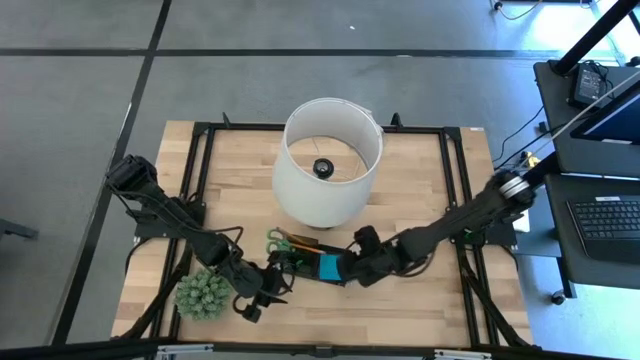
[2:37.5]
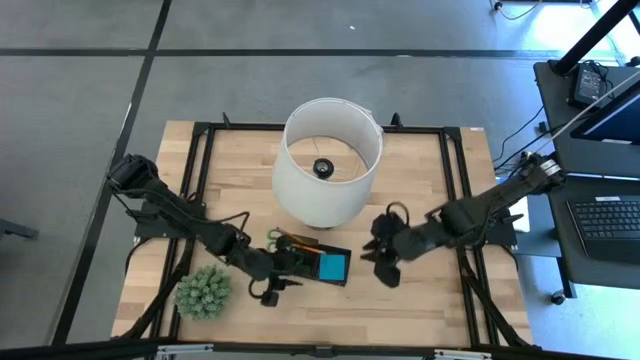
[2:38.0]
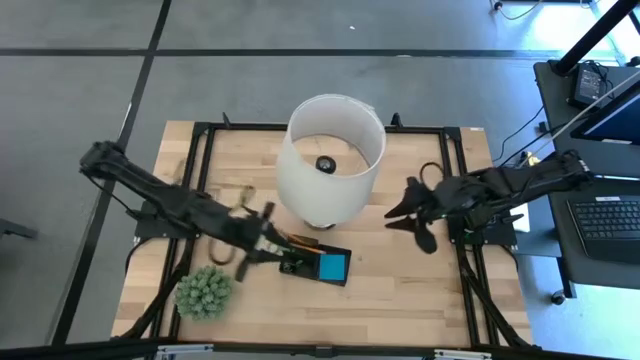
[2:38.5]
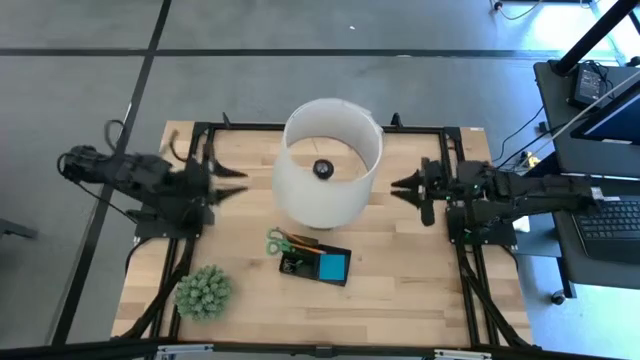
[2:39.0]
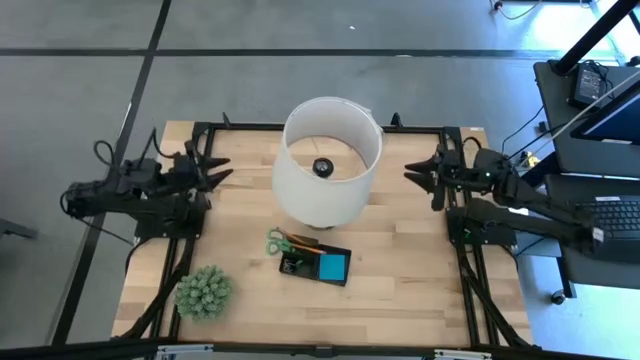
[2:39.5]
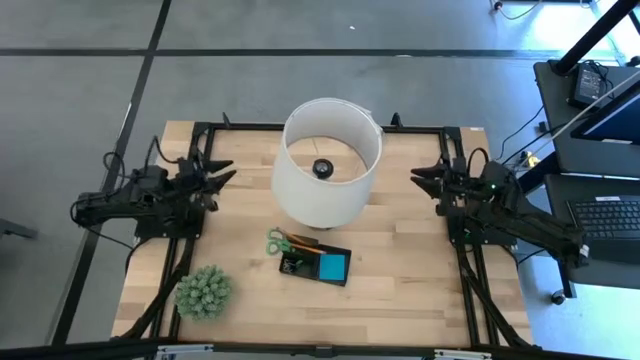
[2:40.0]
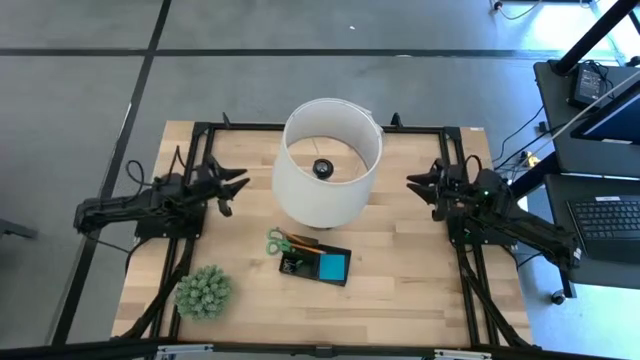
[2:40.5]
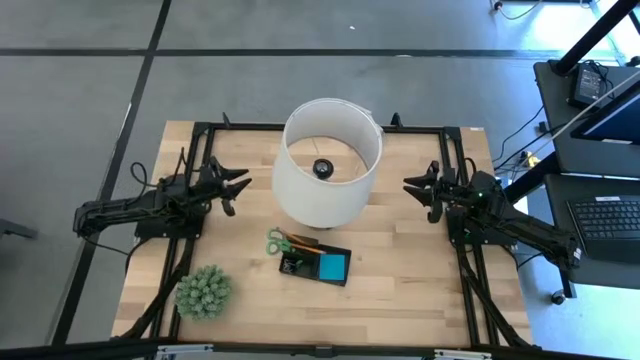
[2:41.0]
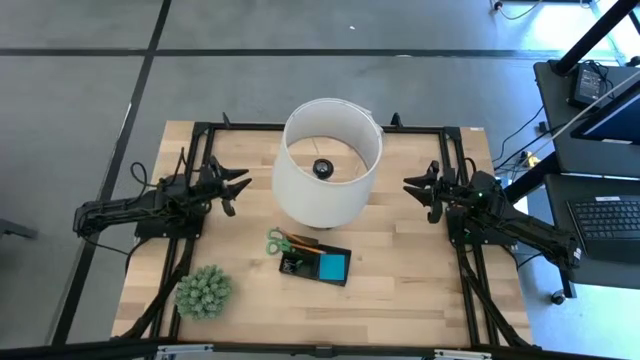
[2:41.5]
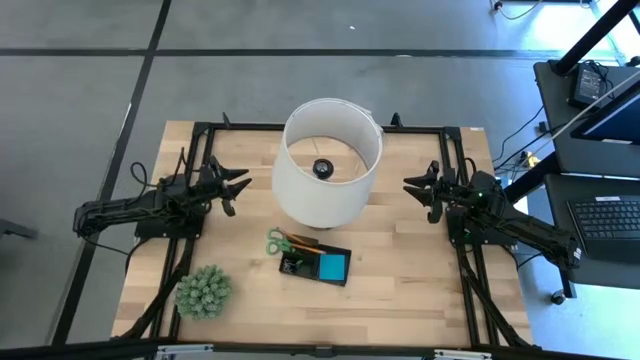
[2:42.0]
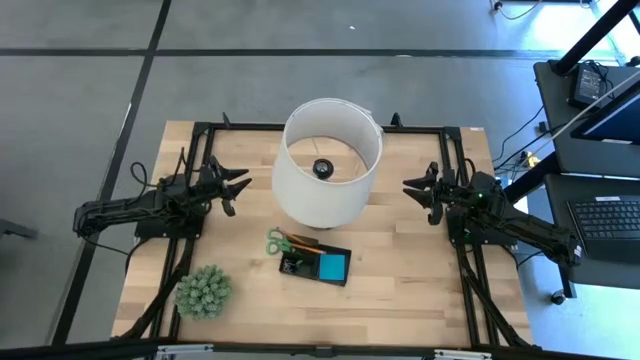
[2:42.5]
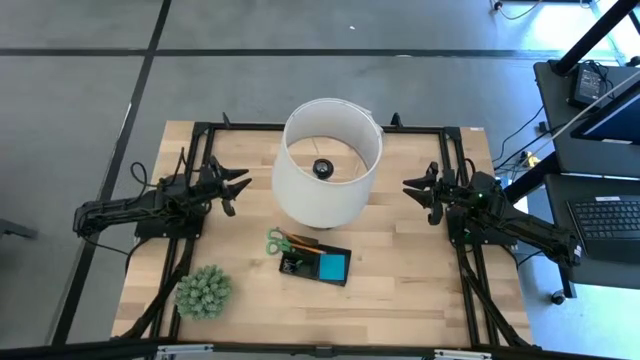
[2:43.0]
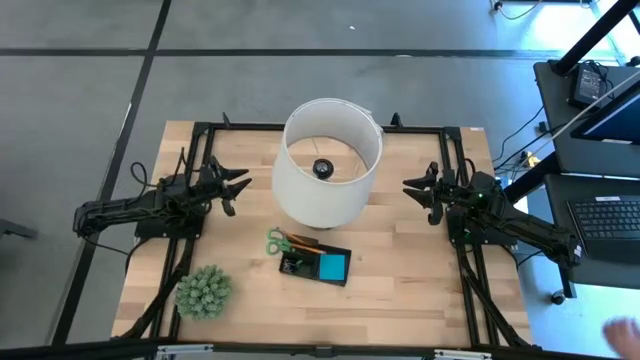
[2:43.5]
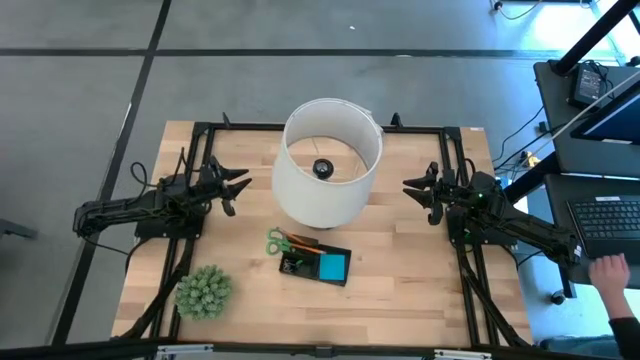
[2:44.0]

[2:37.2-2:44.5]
Task: Pick and place office supplies into organizer
Return to Home Position

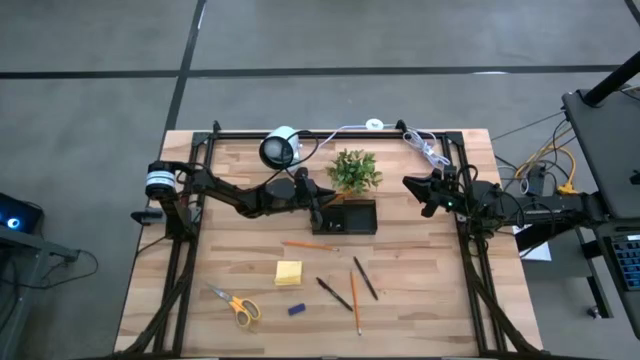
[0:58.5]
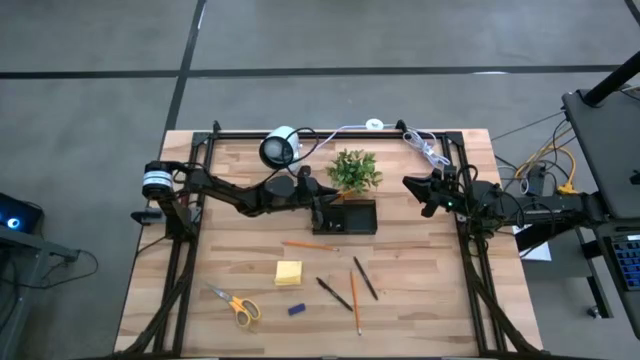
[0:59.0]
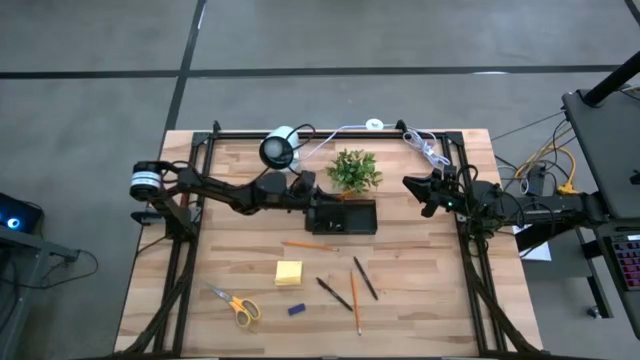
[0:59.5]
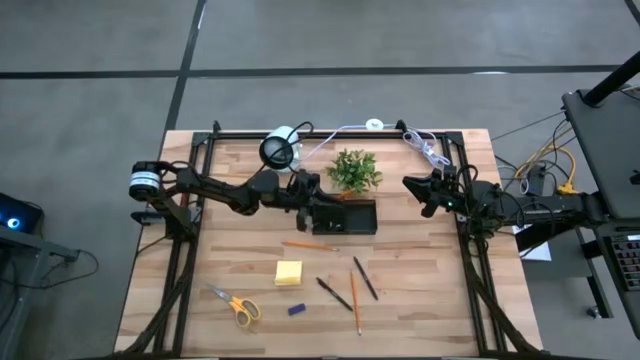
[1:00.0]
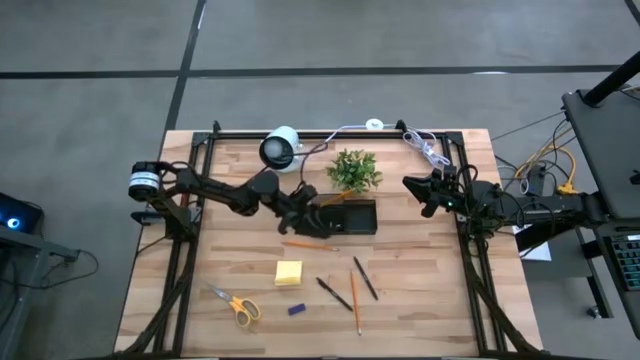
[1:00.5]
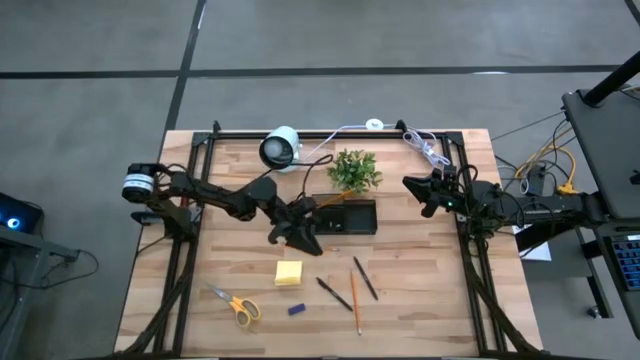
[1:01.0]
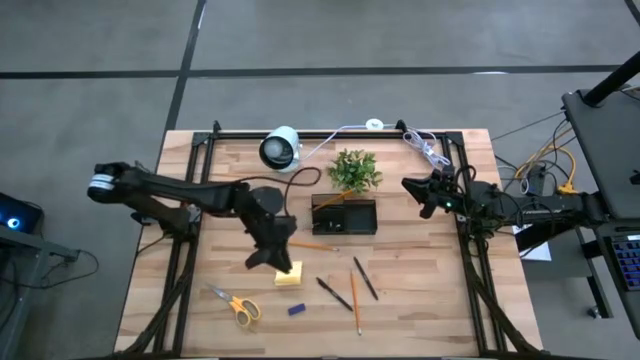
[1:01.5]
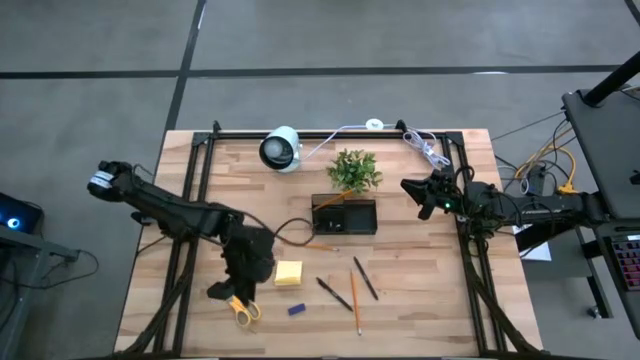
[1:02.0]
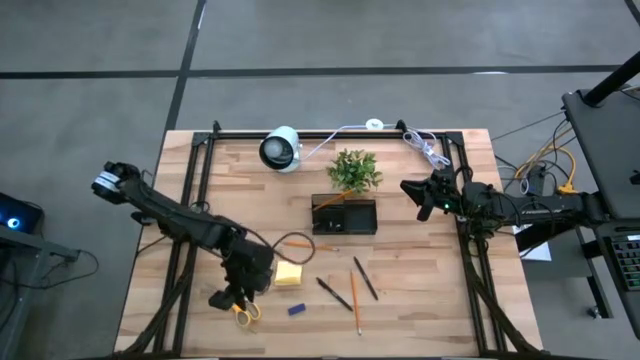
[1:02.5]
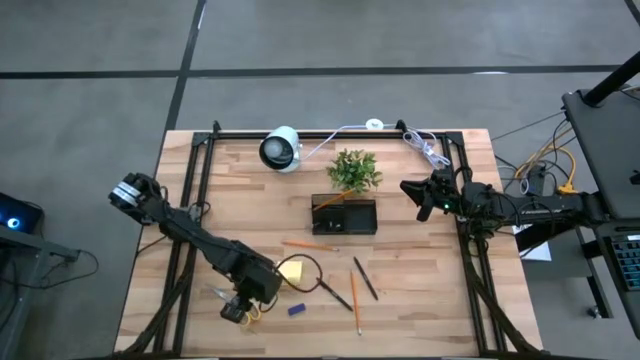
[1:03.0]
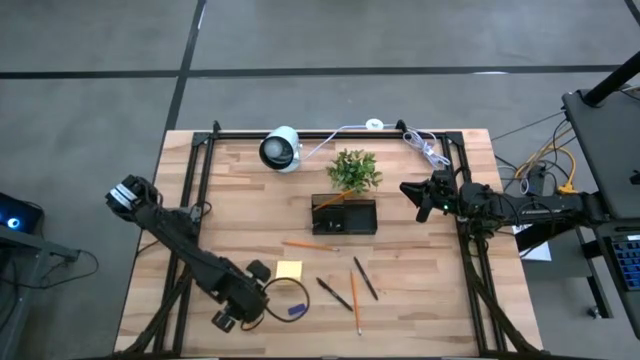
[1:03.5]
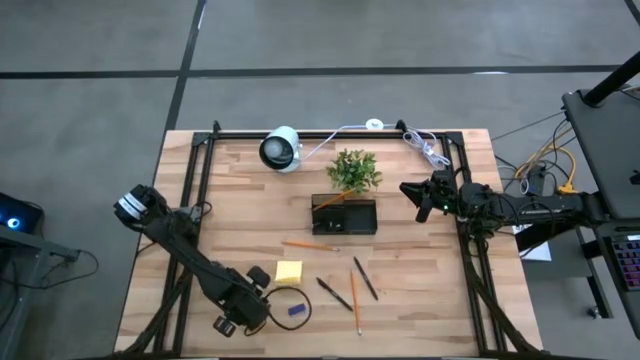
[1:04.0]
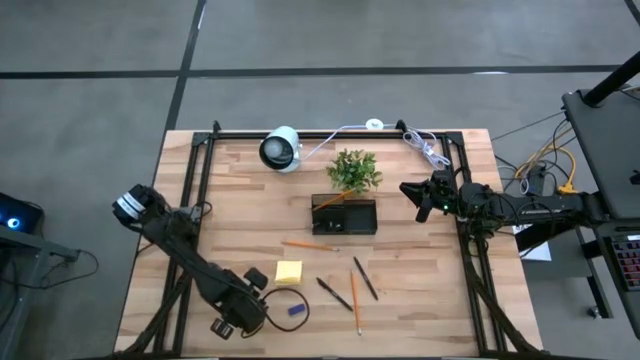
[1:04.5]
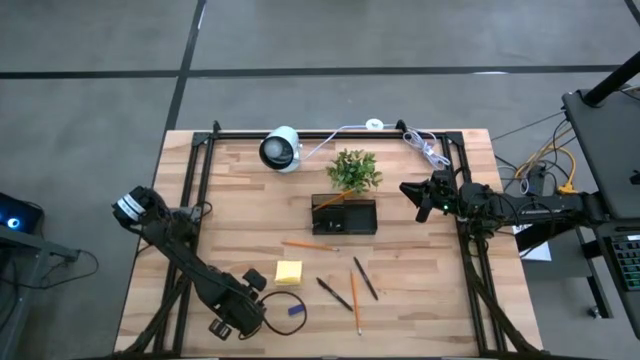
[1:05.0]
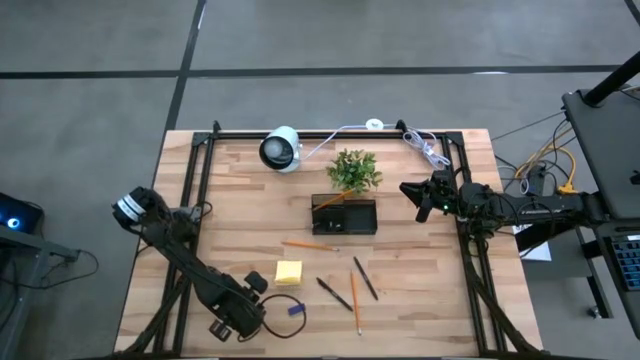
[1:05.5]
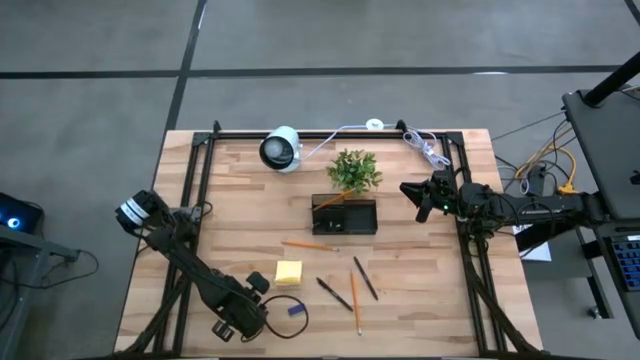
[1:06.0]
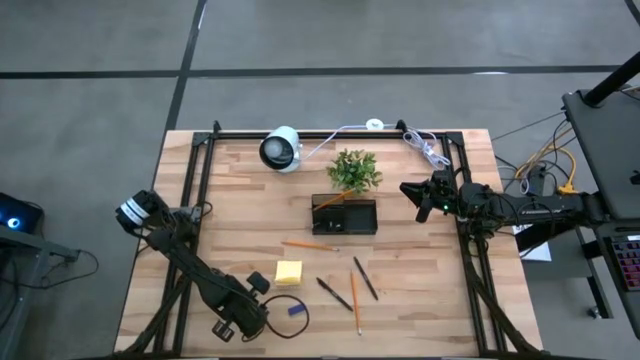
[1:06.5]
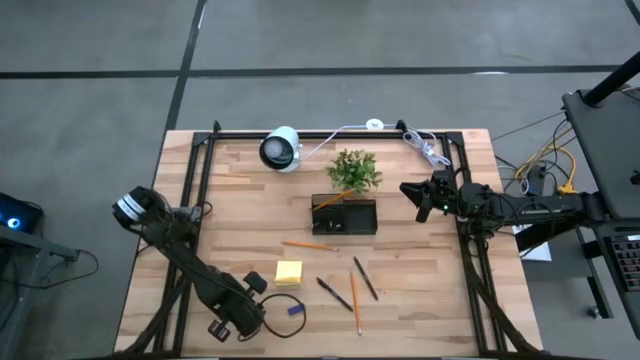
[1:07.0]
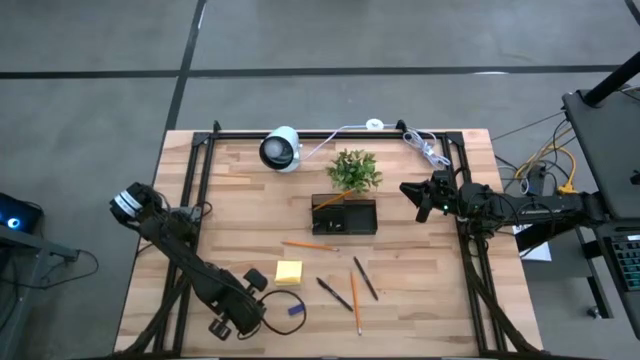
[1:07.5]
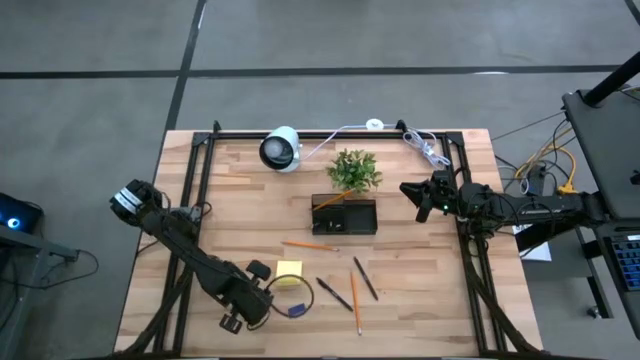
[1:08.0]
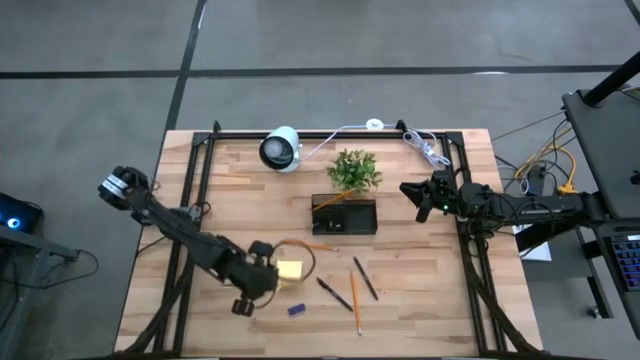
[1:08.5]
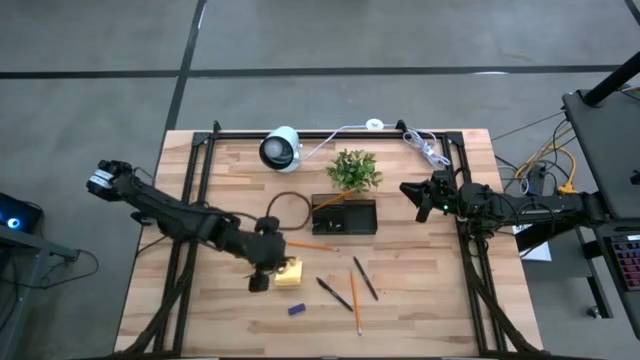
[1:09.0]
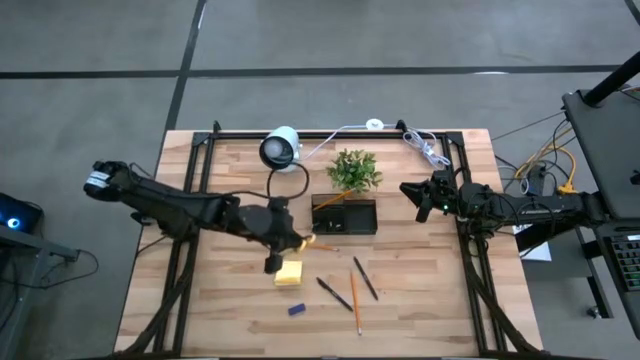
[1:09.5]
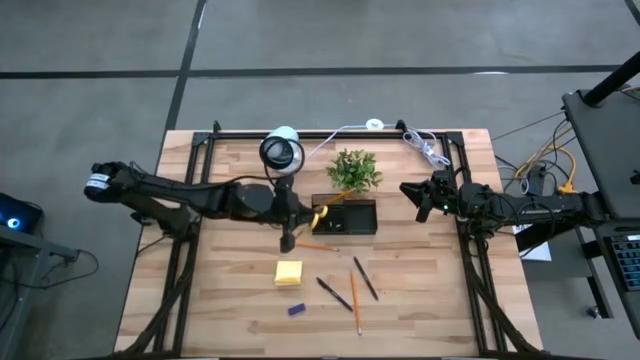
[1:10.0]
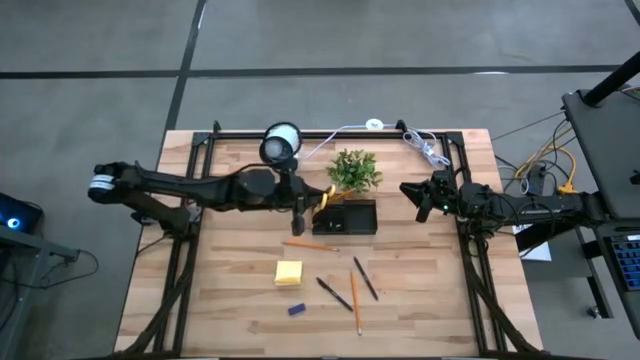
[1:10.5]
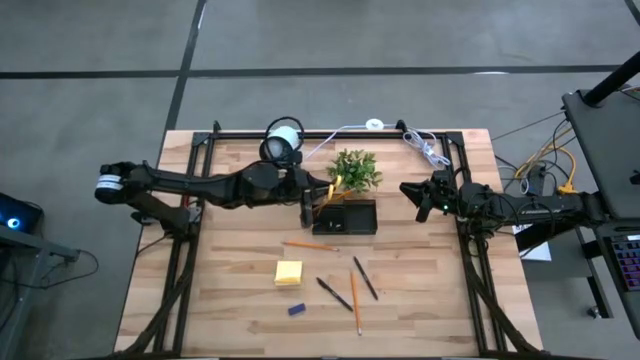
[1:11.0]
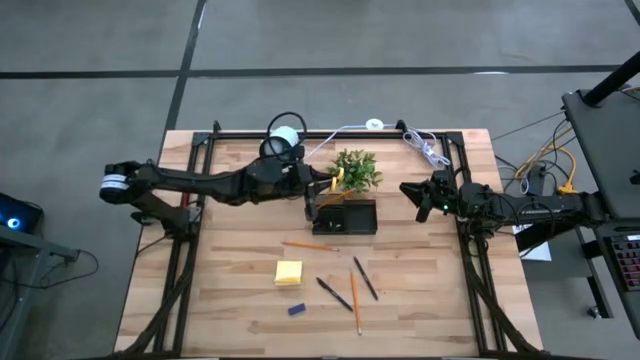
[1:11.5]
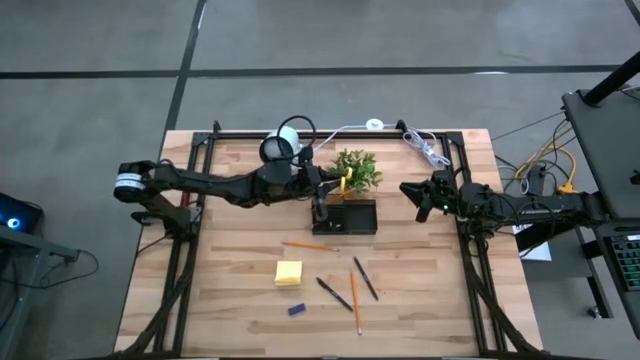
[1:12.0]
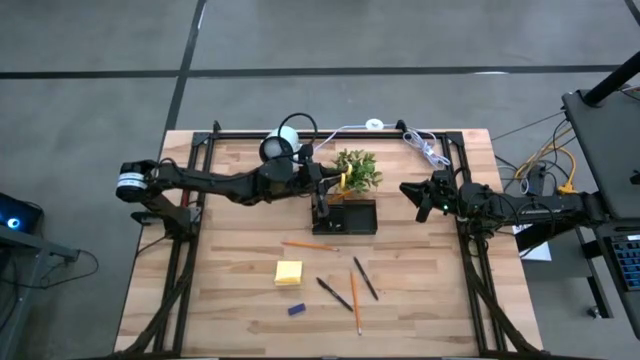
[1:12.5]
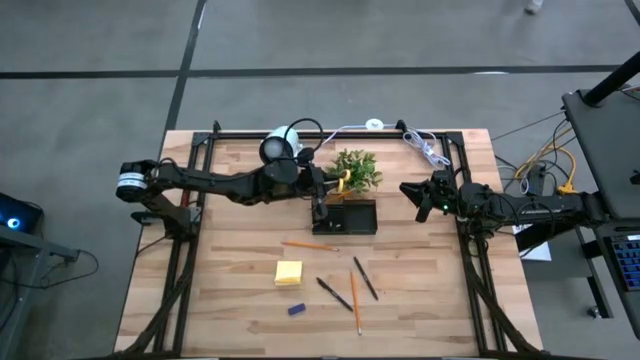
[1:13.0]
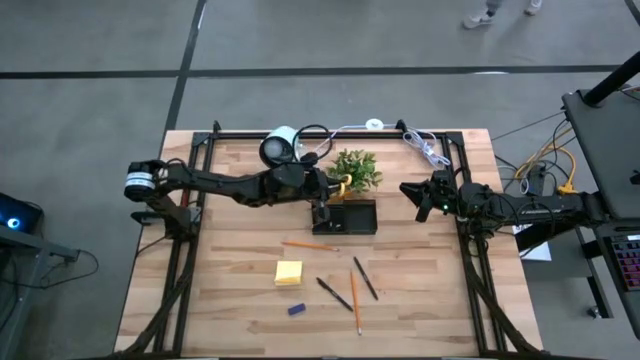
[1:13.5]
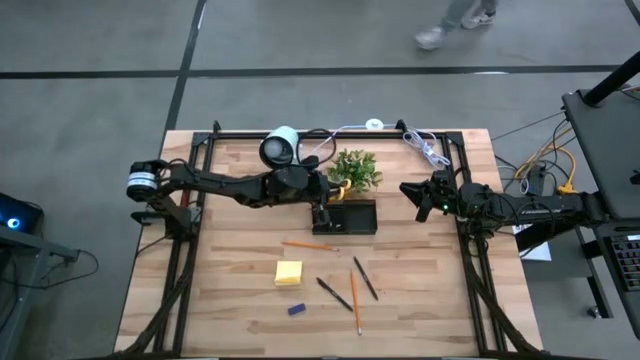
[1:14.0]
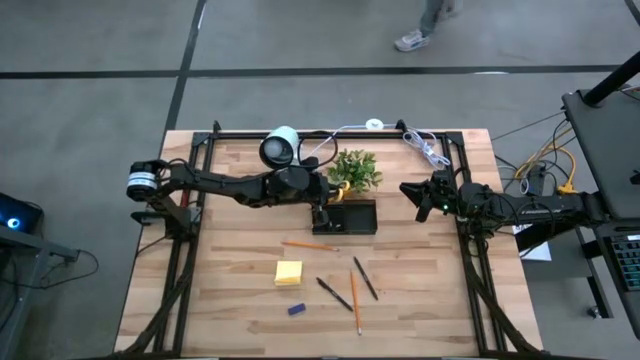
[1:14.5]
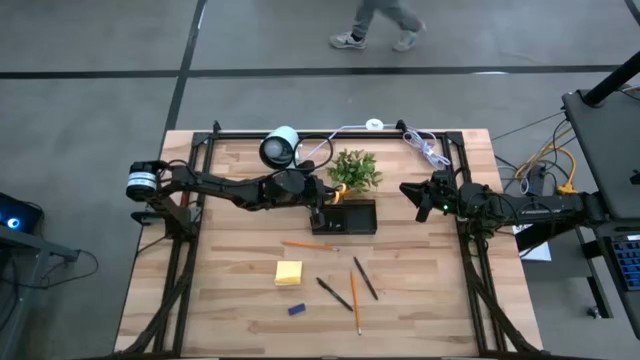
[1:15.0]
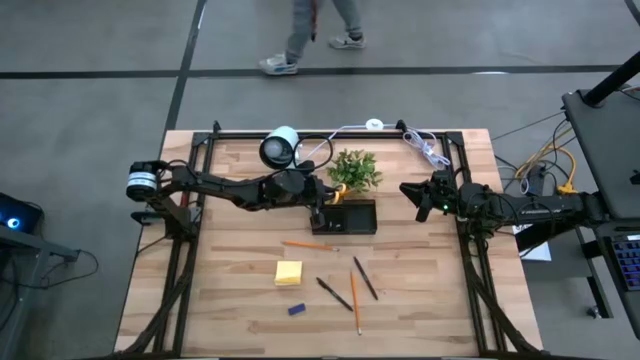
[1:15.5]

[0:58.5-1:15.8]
Task: Pick and place office supplies into organizer
Put the yellow scissors into the black desk organizer
